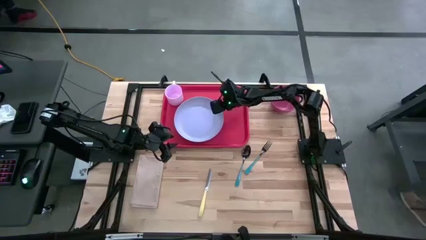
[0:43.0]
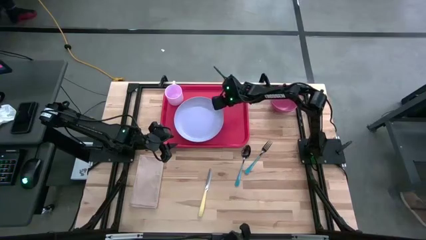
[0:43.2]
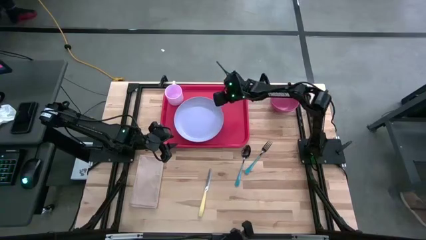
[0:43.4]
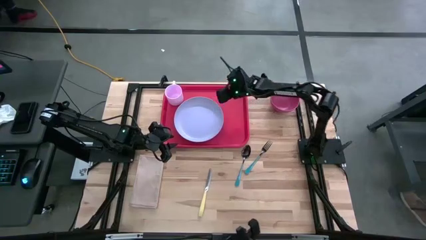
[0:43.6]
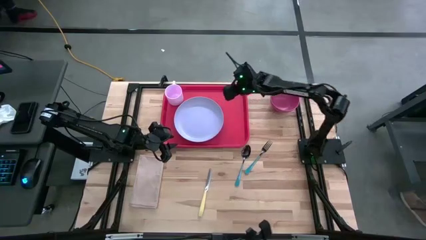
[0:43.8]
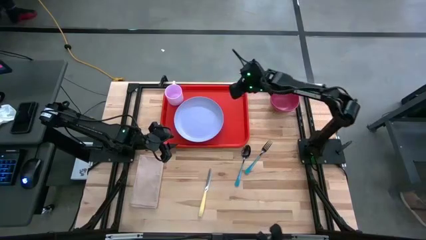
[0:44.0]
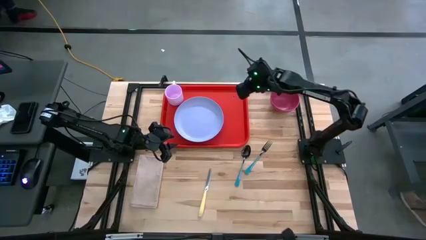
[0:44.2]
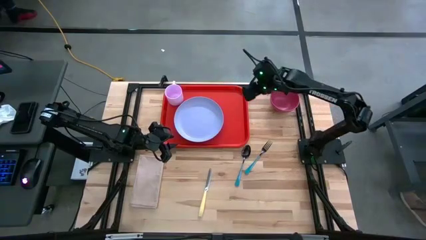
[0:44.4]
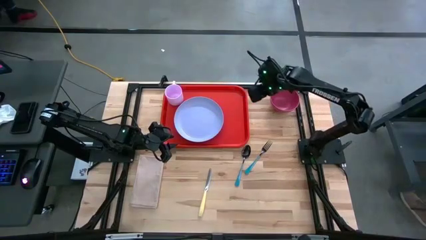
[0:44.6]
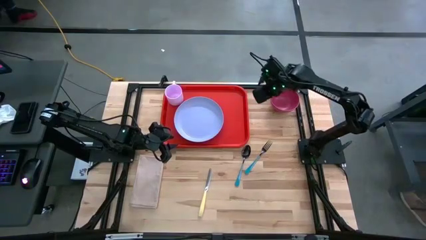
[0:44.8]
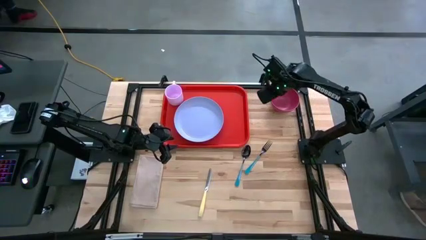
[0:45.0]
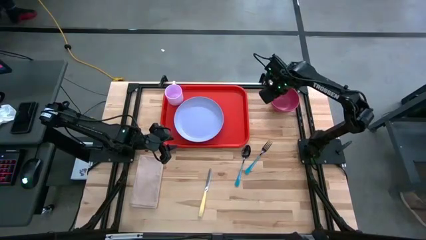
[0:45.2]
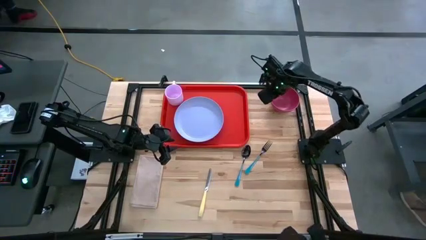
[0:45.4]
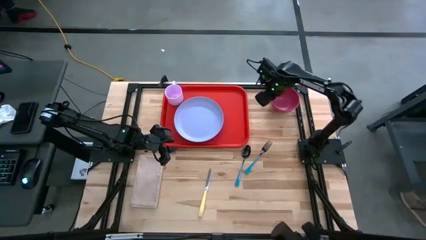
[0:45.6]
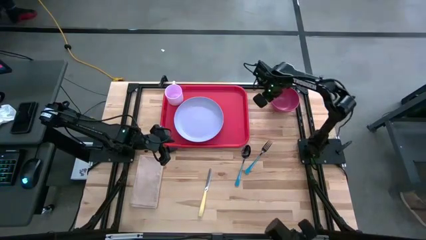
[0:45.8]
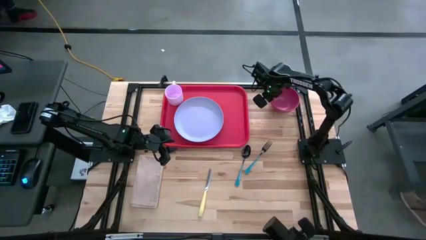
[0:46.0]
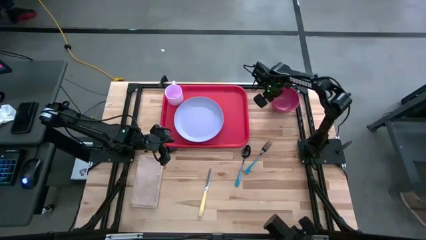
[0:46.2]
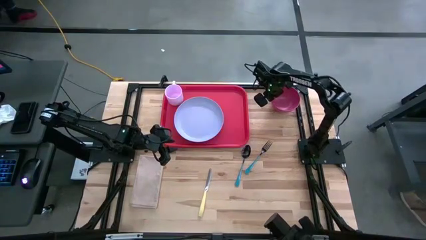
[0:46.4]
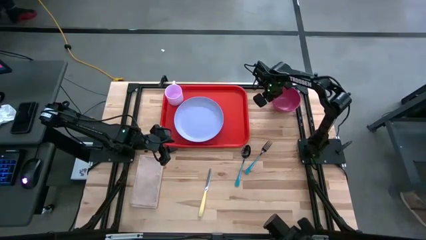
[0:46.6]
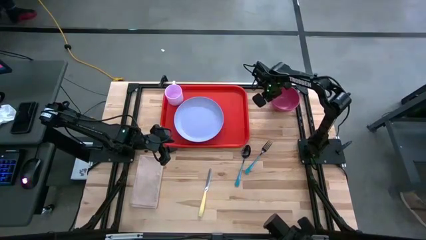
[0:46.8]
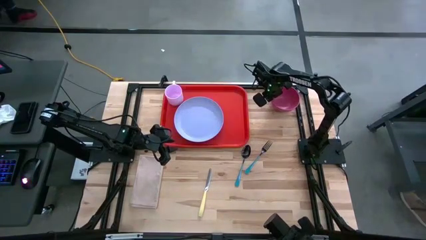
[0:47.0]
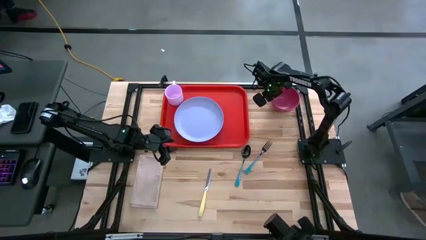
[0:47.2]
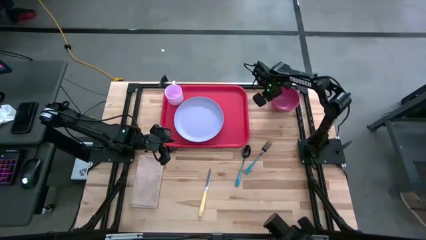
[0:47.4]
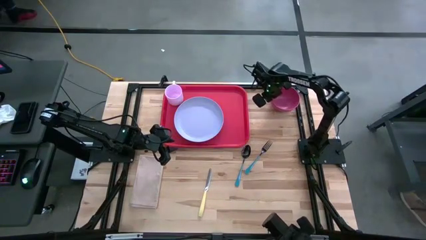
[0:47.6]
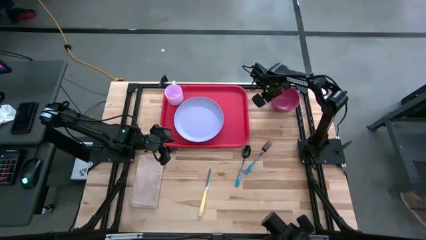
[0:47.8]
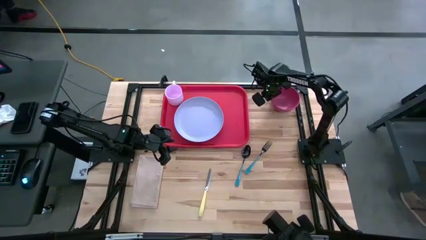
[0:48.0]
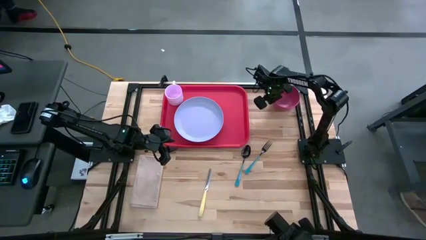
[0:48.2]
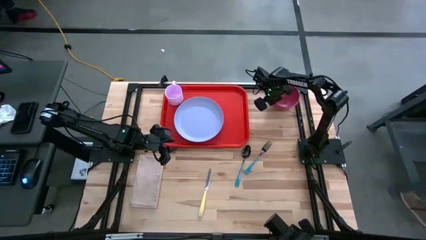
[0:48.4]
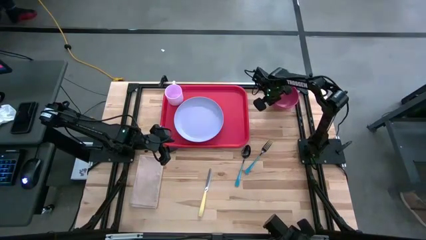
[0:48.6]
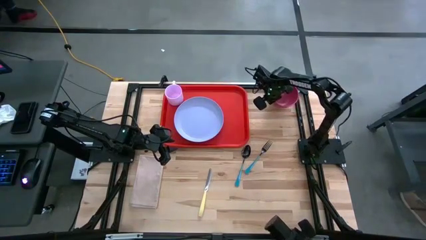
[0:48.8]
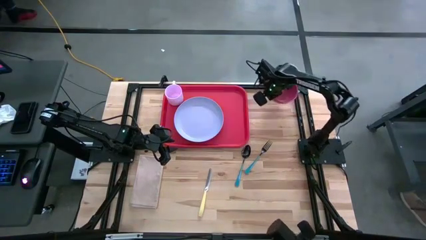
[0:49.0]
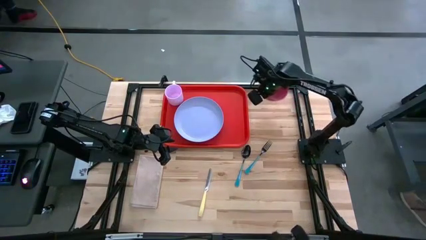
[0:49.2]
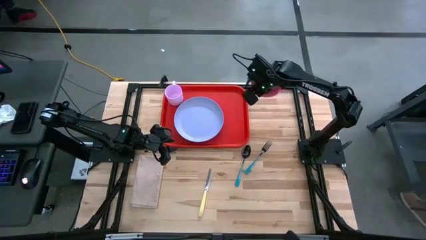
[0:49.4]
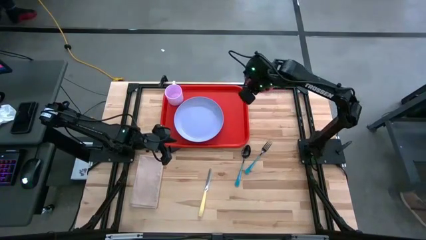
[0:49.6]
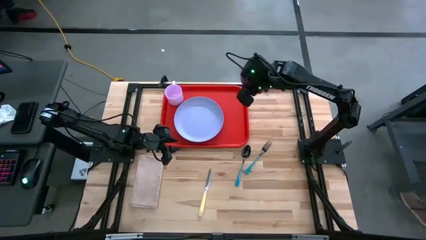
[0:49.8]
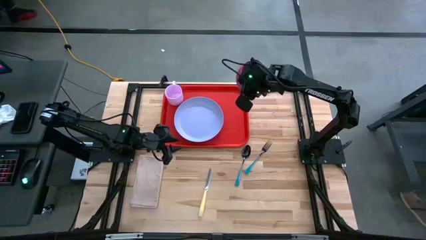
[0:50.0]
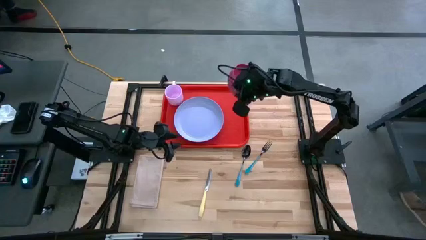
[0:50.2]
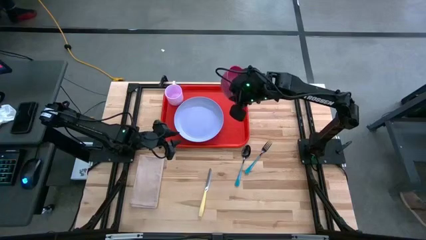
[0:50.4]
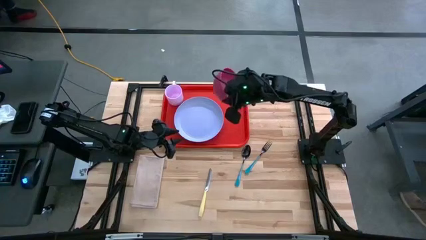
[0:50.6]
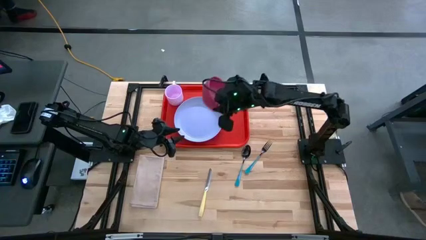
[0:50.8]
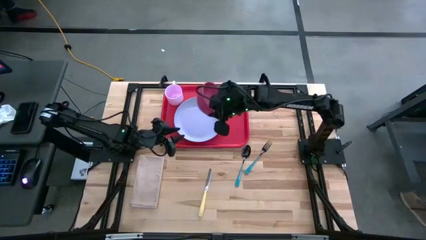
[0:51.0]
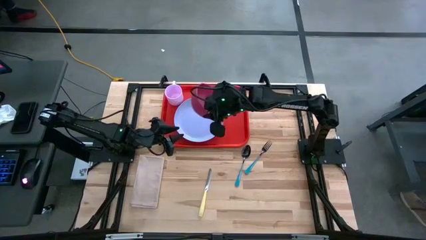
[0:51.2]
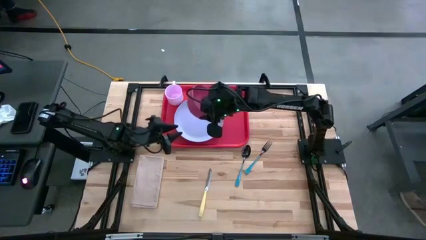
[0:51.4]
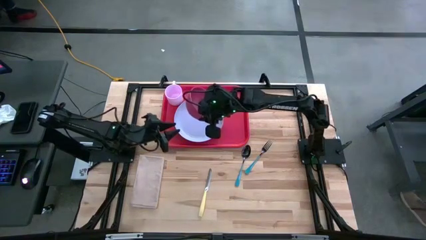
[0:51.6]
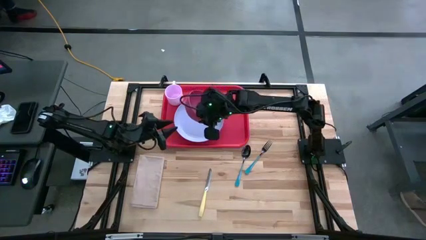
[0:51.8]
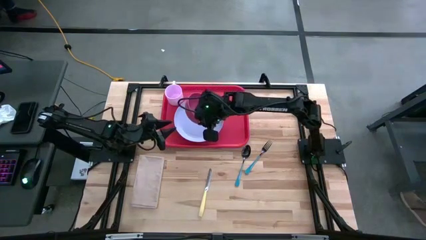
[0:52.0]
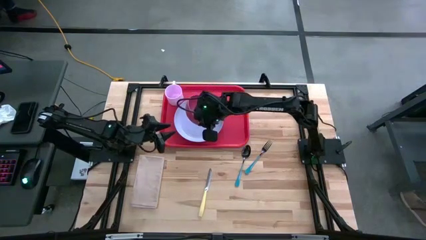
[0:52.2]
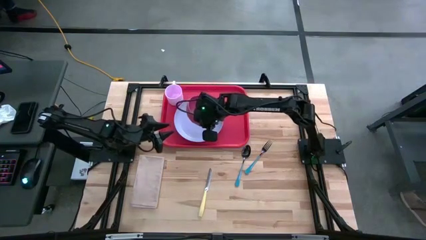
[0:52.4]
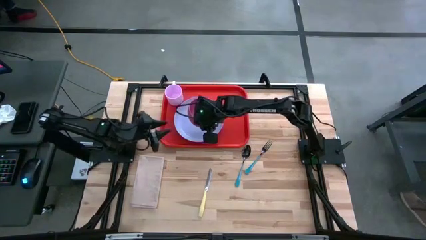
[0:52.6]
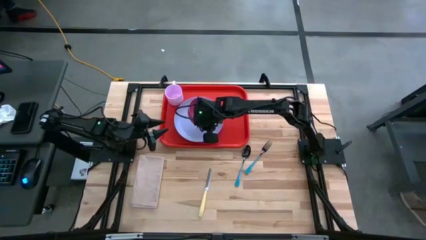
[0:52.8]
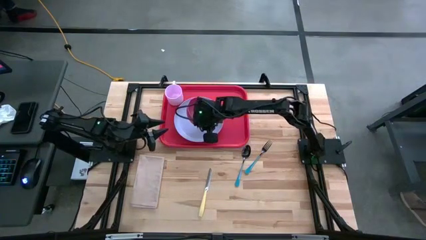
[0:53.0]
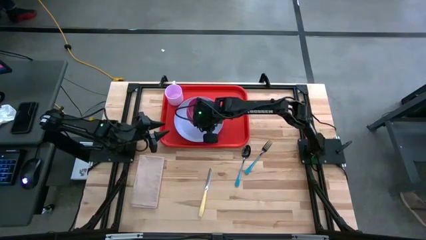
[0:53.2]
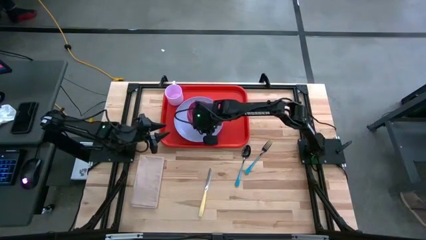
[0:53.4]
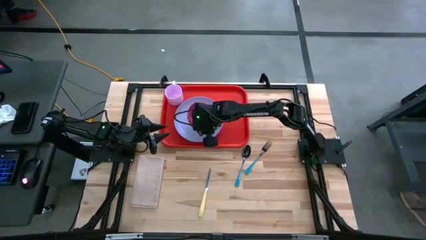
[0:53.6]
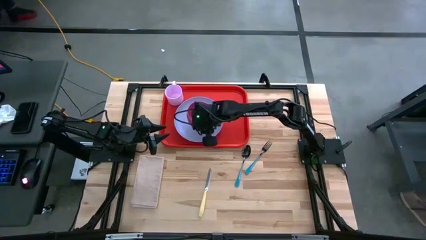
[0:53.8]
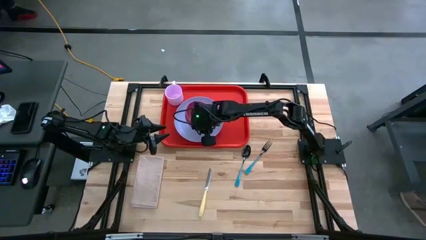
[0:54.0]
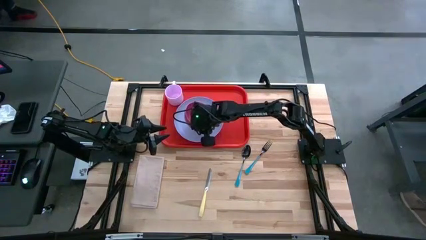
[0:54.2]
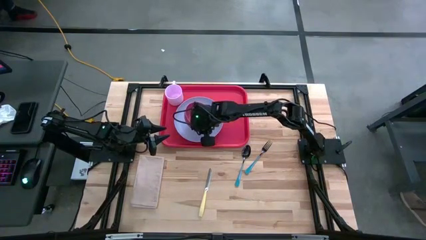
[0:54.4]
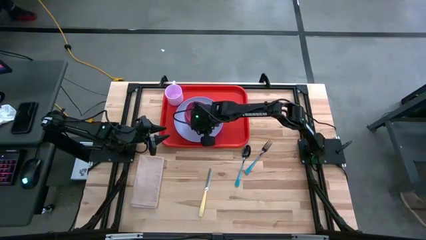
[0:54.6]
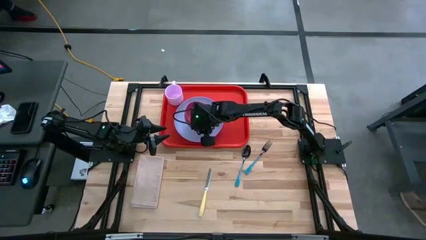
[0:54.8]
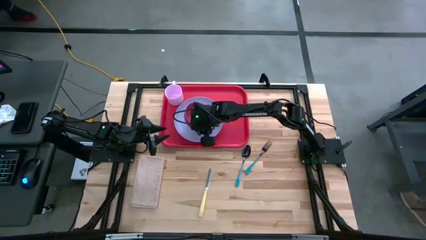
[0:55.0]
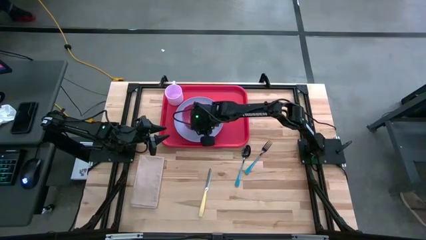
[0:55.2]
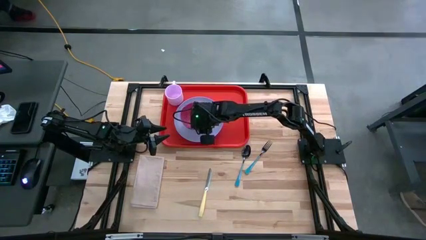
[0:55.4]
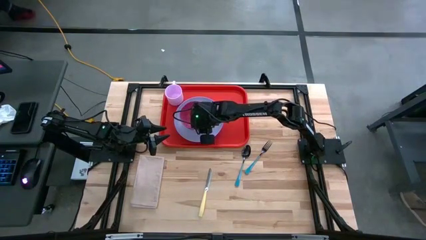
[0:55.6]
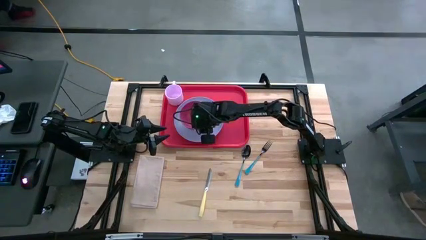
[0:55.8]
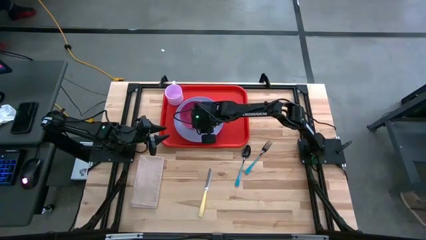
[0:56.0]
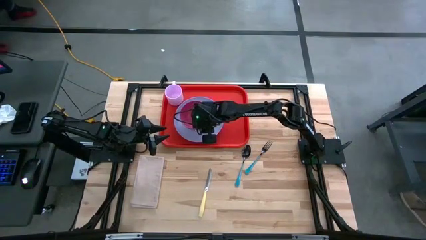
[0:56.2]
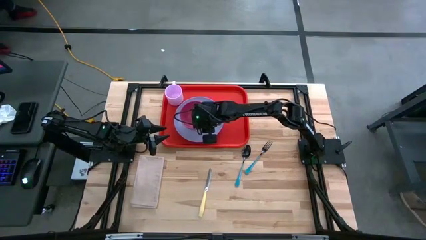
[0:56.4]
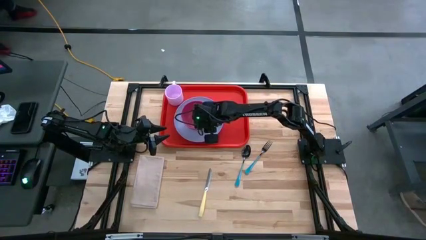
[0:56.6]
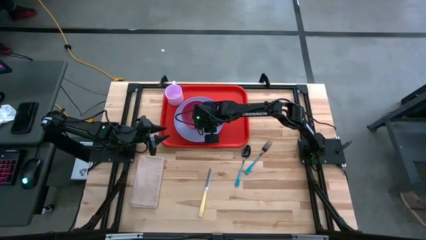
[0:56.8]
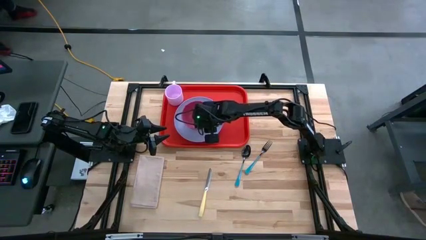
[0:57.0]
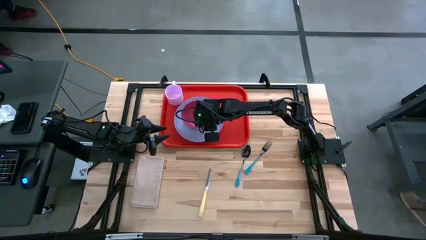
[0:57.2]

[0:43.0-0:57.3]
Task: Set up tray
Put the red bowl on the white plate
